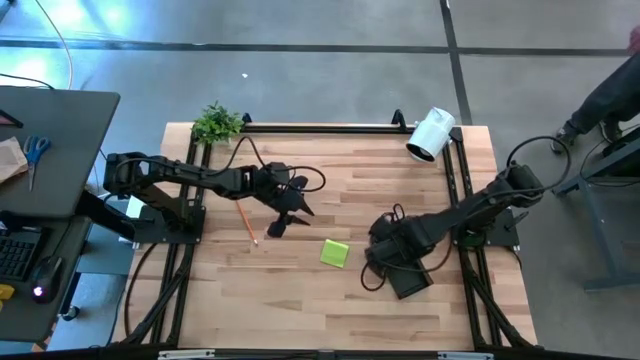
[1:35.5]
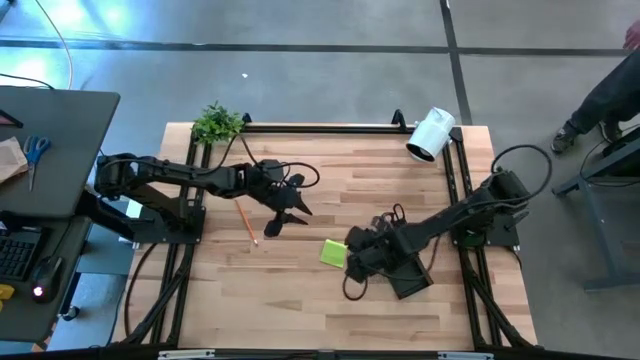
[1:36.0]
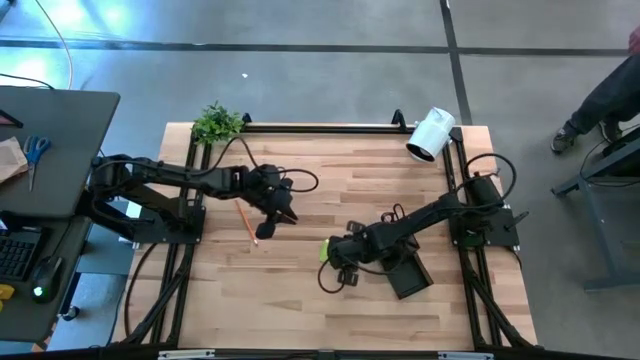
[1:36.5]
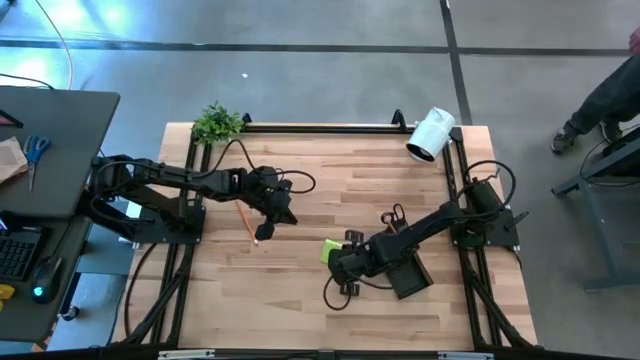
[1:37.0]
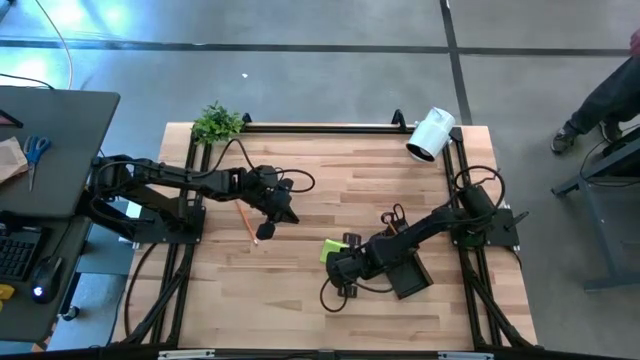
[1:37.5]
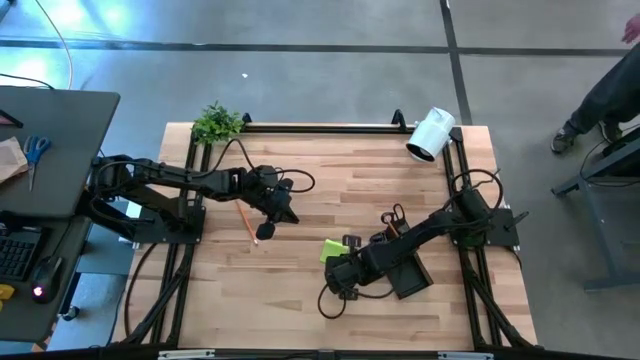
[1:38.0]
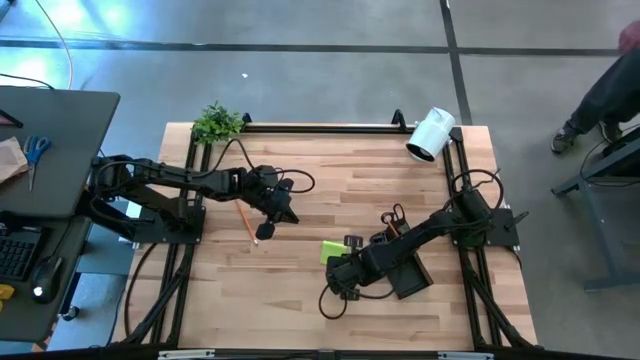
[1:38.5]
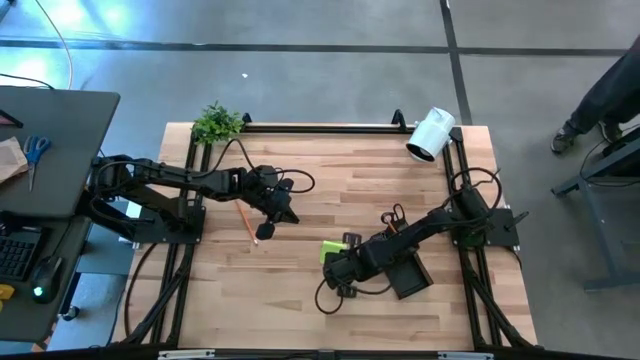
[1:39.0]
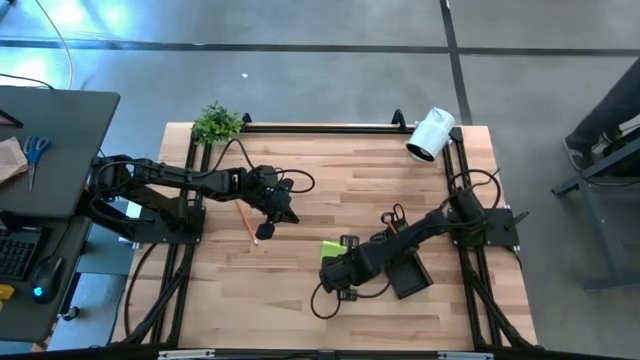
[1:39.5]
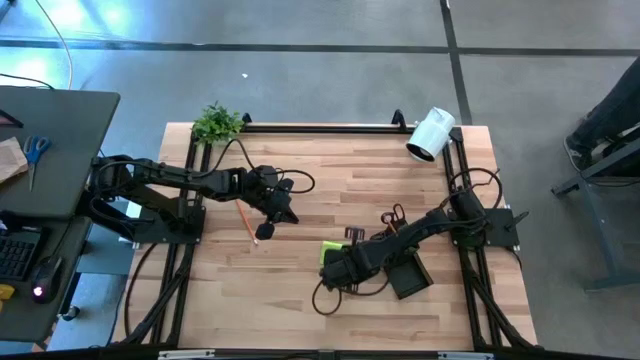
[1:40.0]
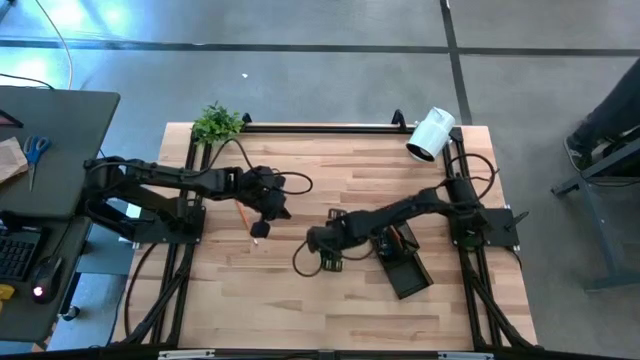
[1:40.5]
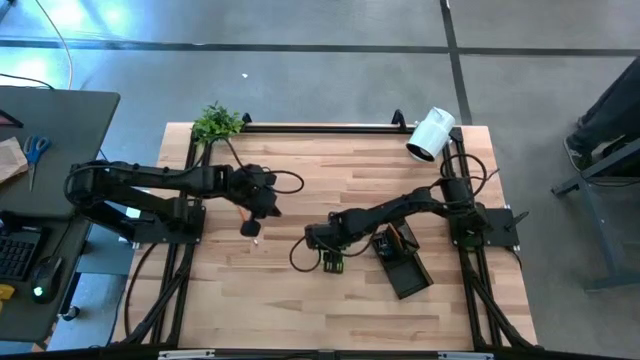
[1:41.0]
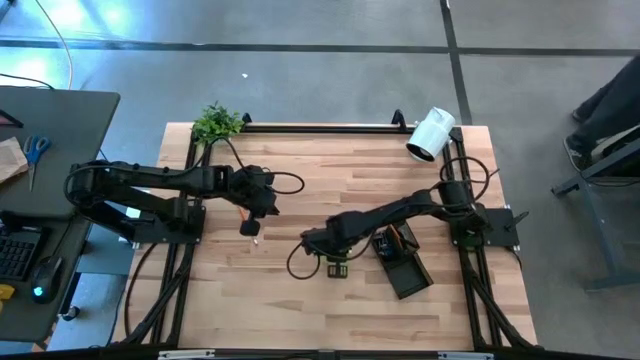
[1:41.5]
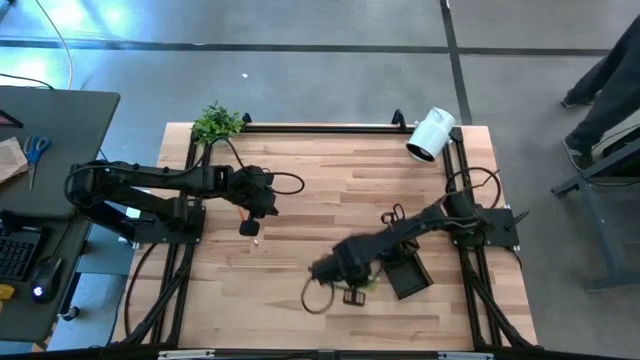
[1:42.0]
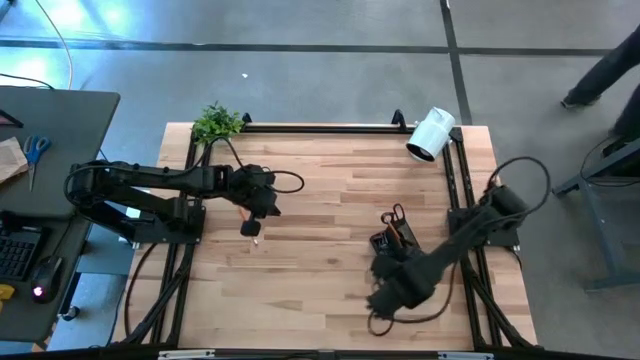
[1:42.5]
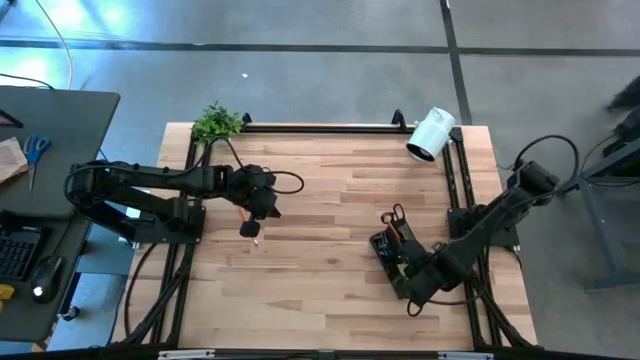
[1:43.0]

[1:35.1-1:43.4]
Task: Pick and place office supplies into organizer
Put the green sticky notes into the black desk organizer

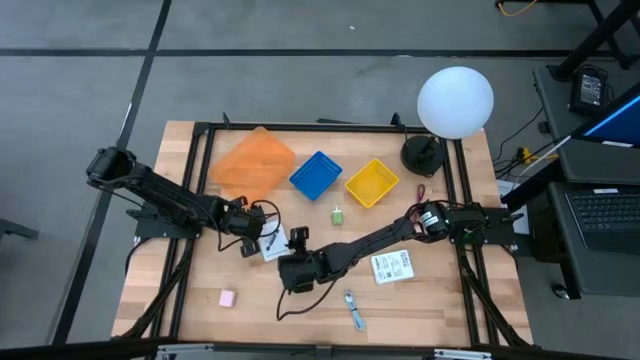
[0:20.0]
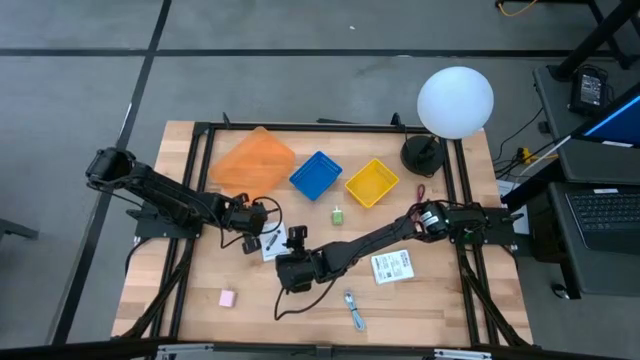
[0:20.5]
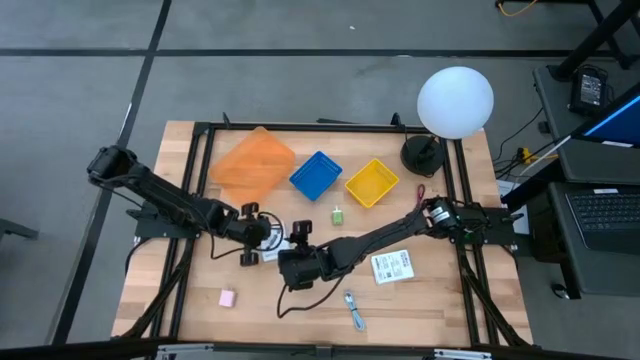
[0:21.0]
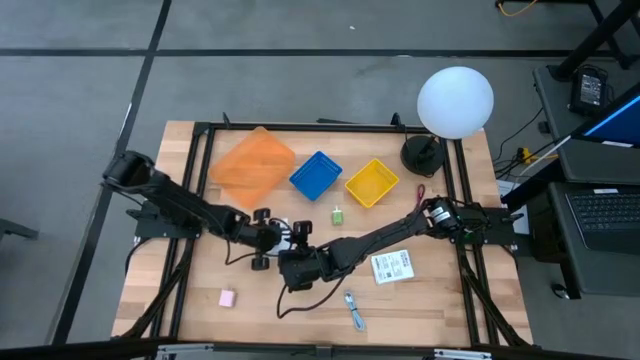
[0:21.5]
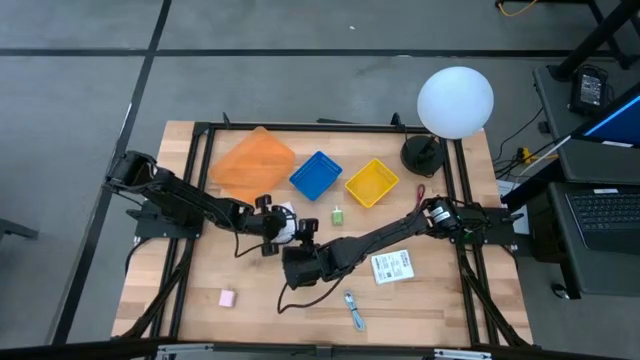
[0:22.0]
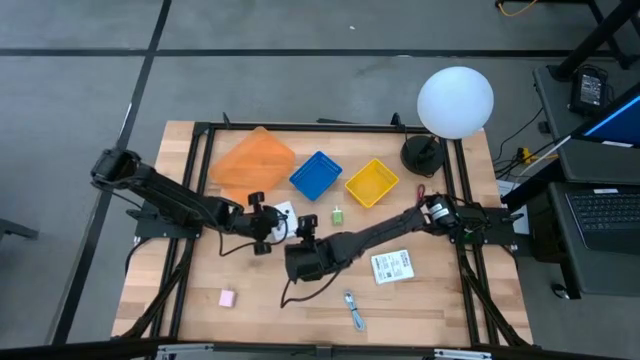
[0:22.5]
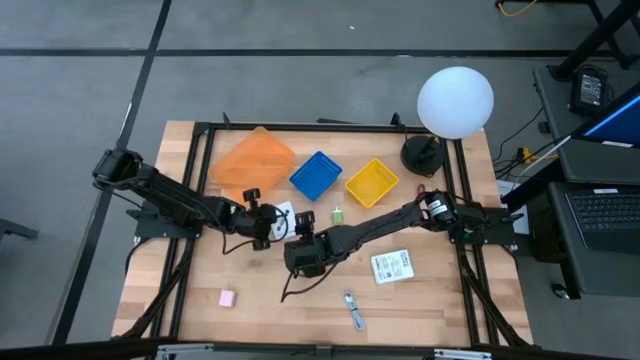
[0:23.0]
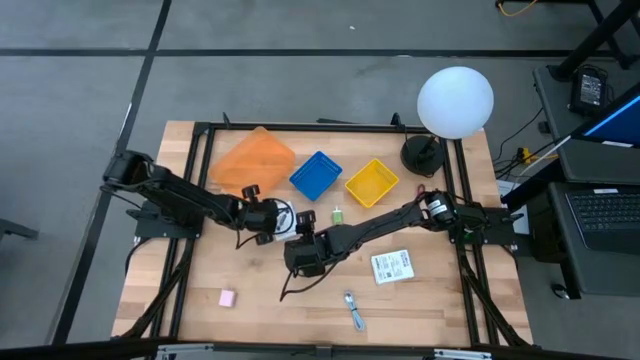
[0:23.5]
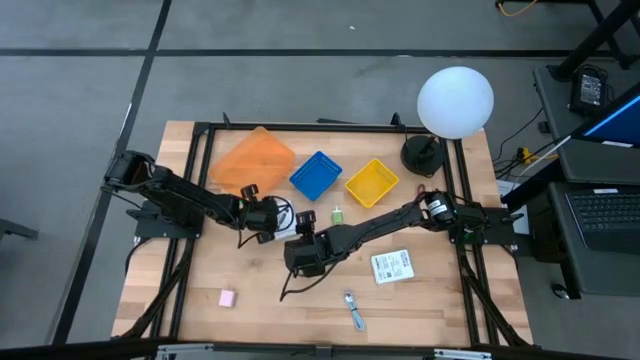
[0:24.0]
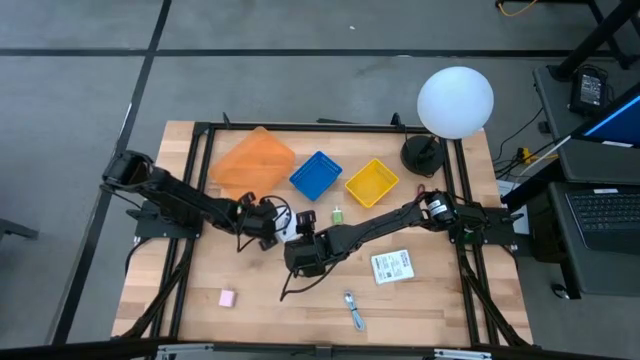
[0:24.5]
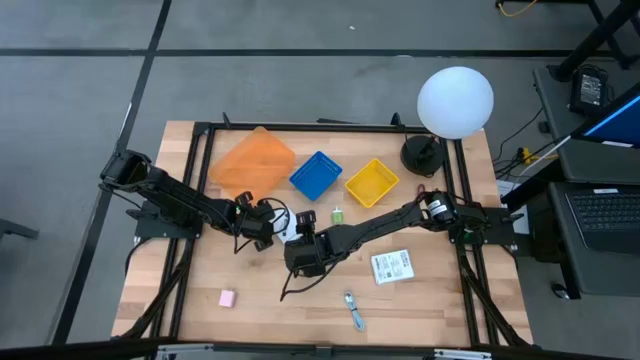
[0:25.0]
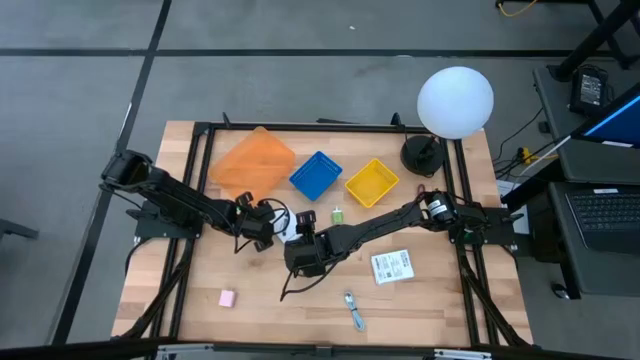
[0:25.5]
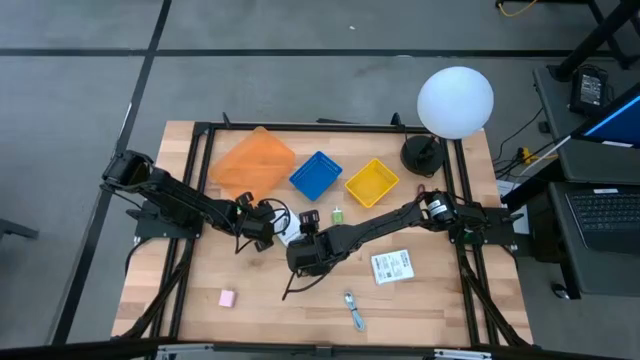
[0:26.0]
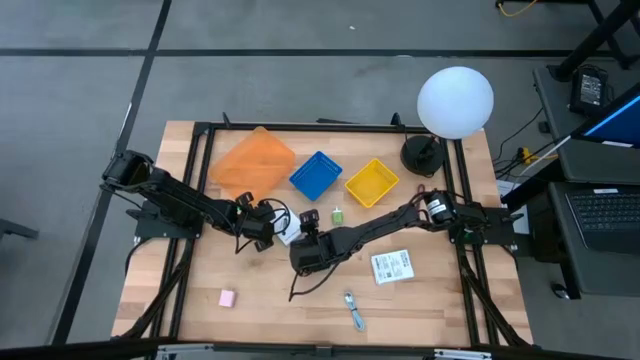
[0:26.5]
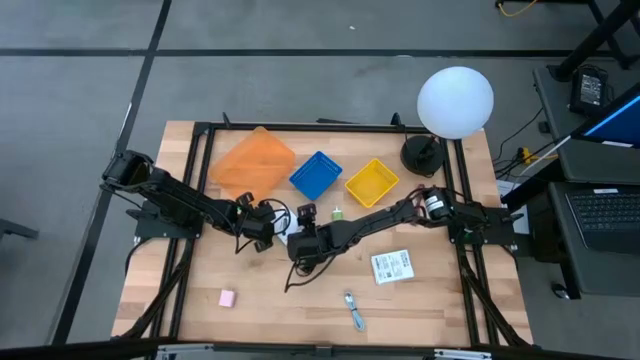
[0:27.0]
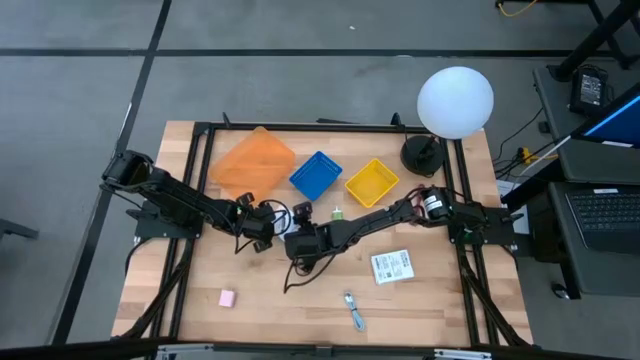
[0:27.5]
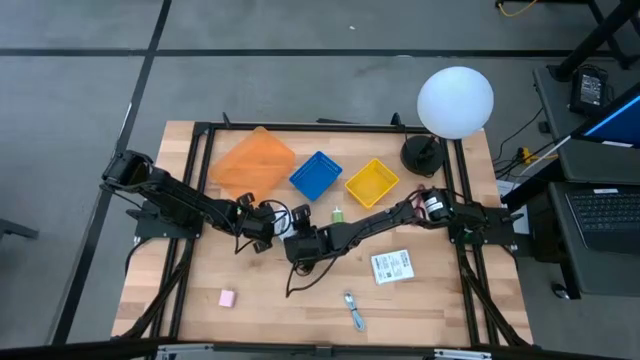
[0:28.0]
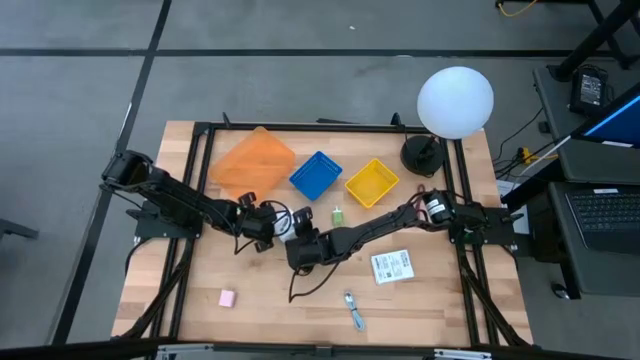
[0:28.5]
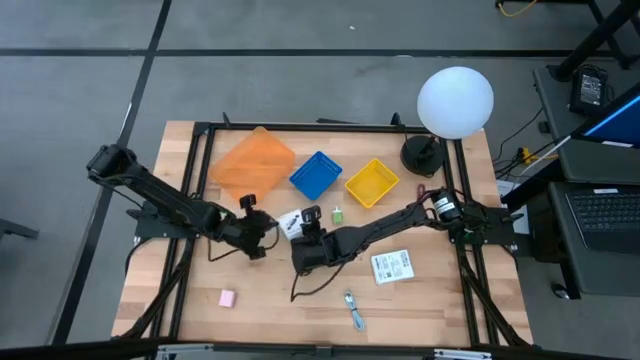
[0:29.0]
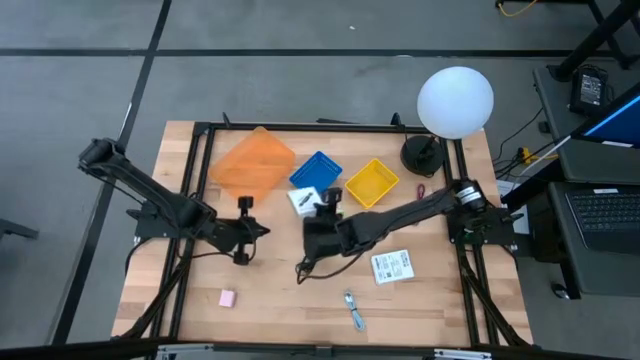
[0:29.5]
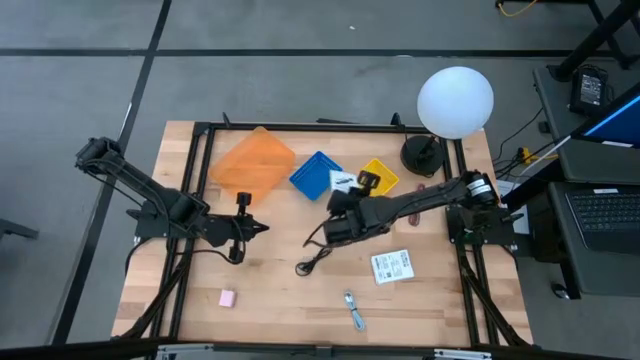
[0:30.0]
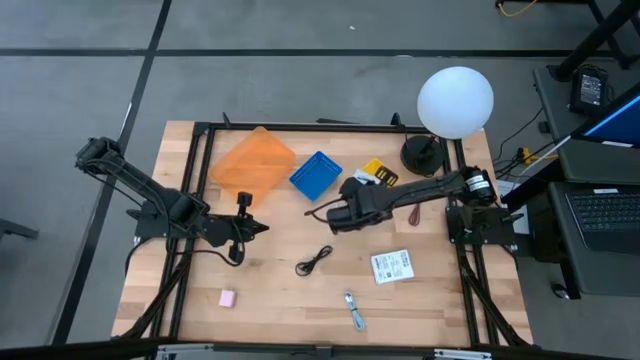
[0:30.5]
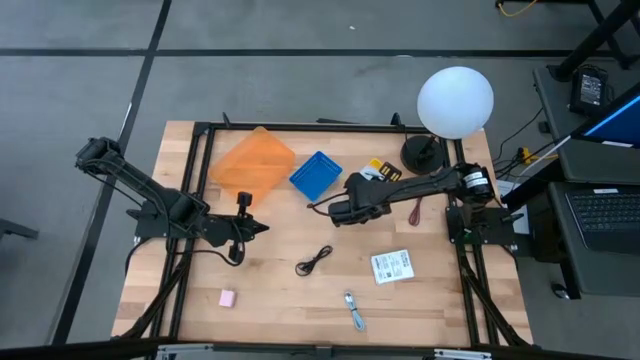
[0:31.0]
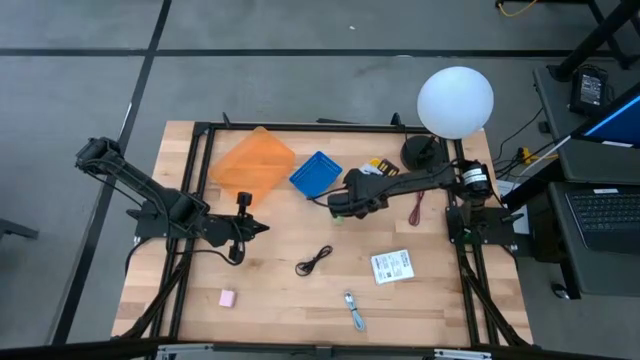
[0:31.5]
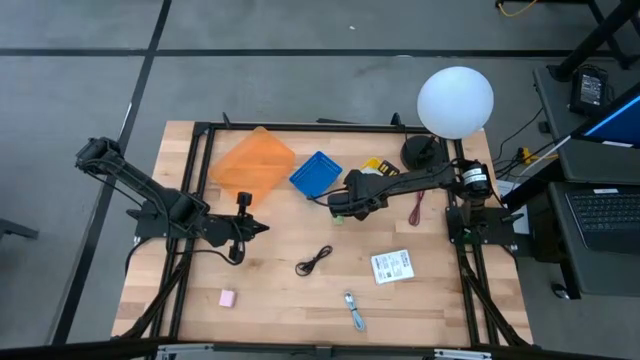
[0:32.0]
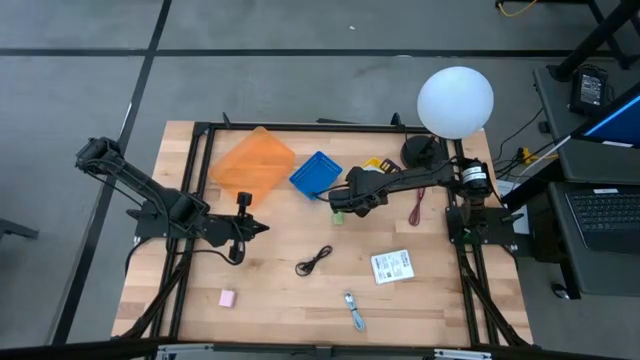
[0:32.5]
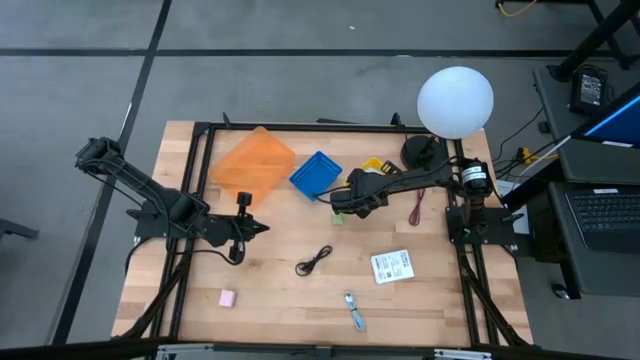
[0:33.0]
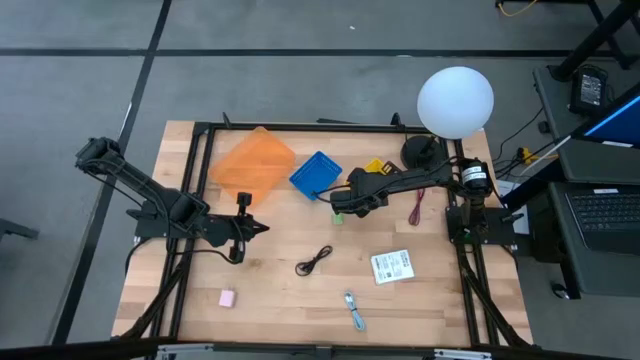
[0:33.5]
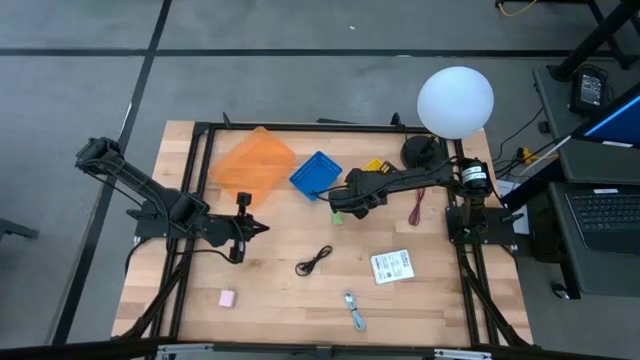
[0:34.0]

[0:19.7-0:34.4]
Task: Pick and place items into bin
Put the left white card reader box into the yellow bin
